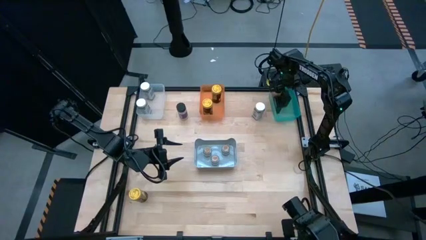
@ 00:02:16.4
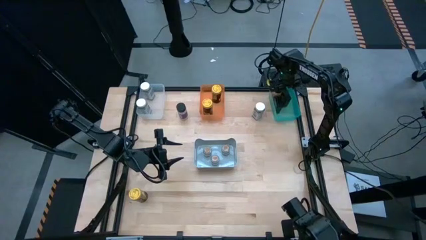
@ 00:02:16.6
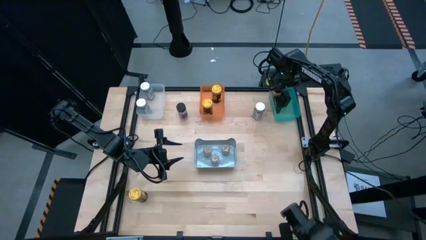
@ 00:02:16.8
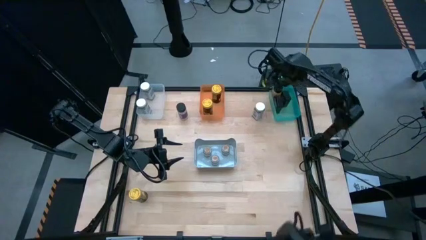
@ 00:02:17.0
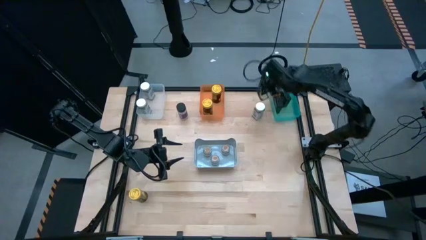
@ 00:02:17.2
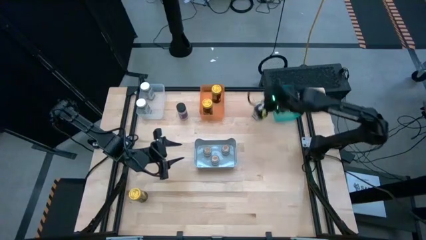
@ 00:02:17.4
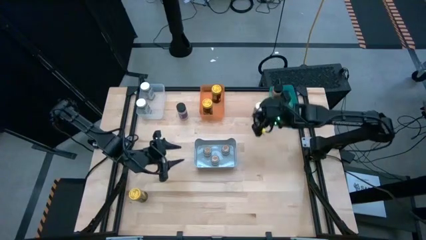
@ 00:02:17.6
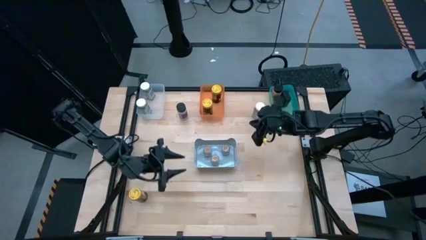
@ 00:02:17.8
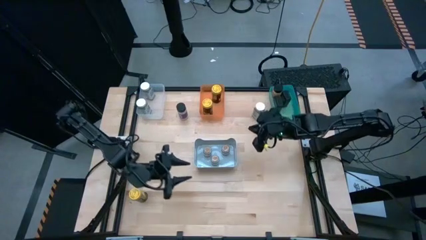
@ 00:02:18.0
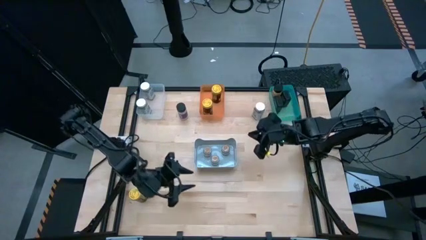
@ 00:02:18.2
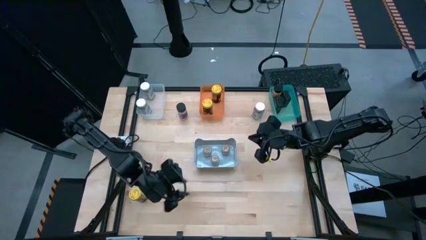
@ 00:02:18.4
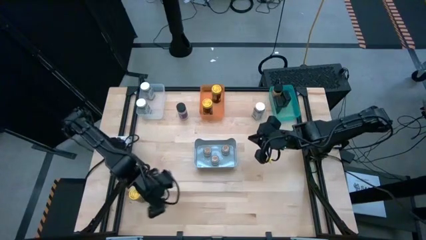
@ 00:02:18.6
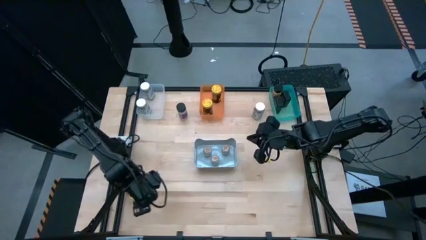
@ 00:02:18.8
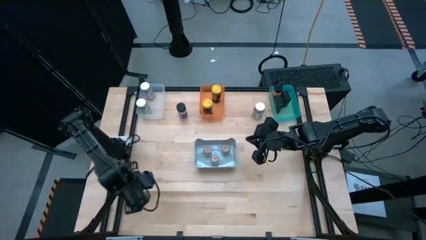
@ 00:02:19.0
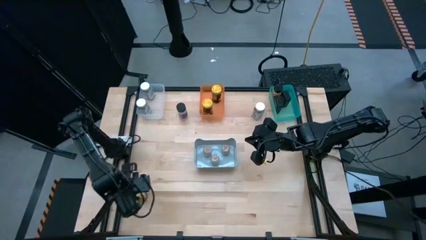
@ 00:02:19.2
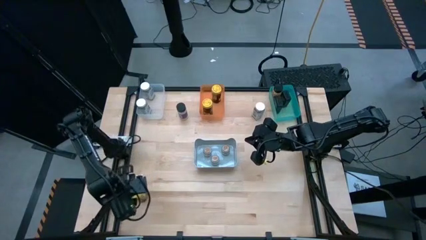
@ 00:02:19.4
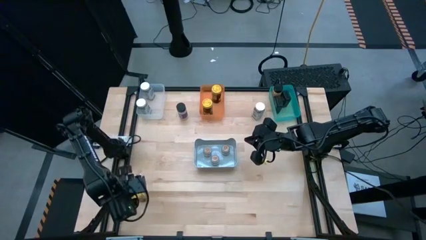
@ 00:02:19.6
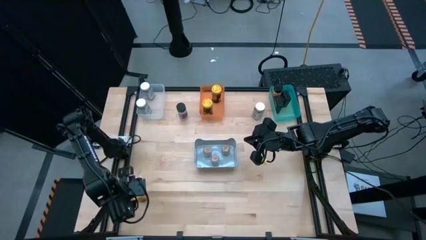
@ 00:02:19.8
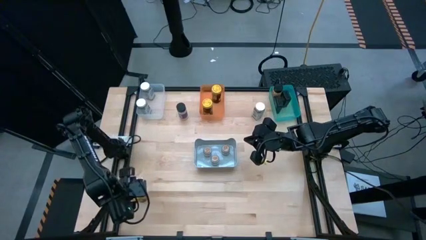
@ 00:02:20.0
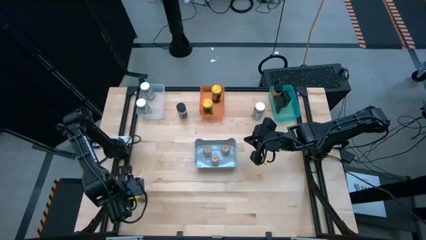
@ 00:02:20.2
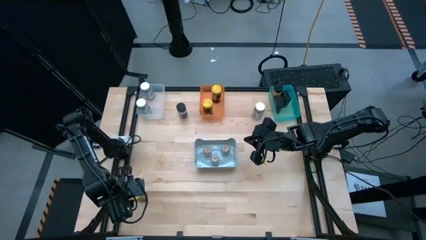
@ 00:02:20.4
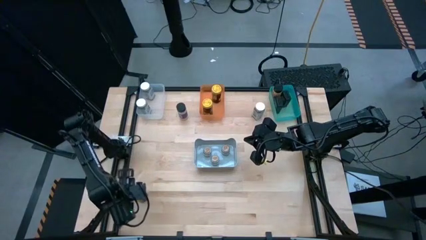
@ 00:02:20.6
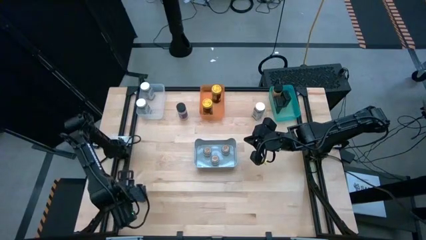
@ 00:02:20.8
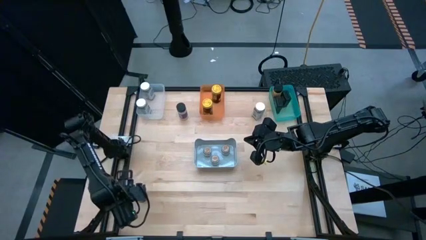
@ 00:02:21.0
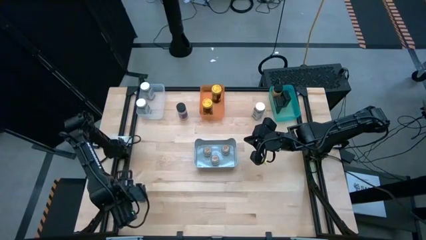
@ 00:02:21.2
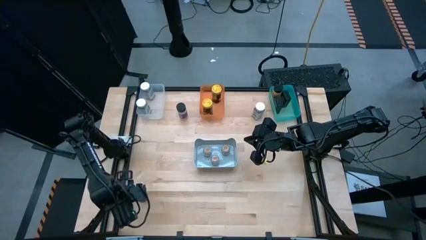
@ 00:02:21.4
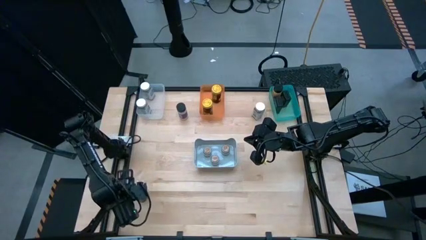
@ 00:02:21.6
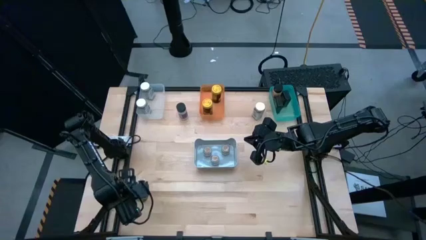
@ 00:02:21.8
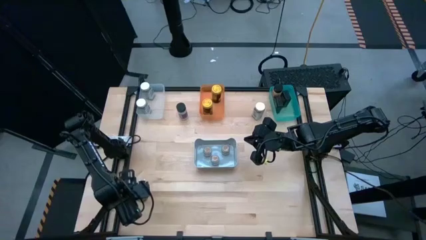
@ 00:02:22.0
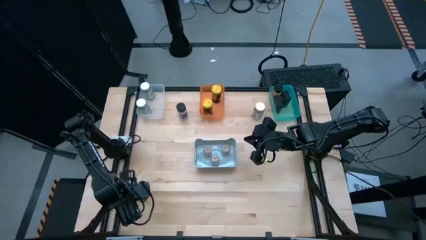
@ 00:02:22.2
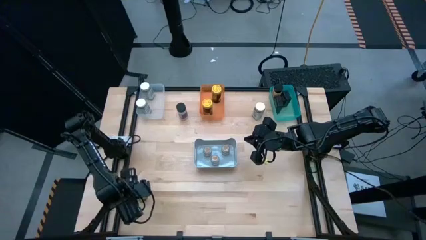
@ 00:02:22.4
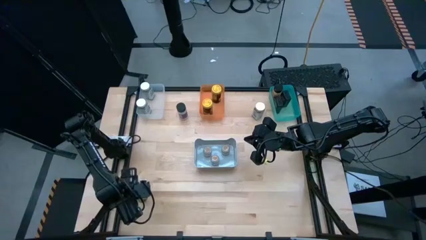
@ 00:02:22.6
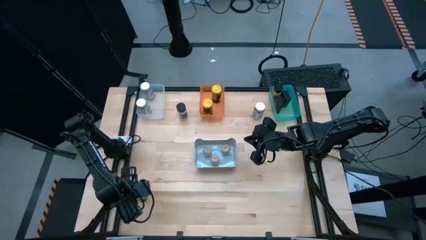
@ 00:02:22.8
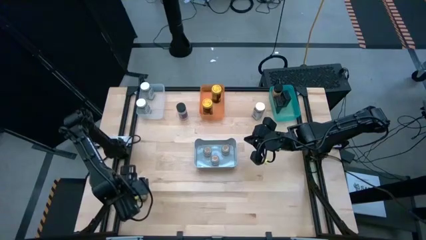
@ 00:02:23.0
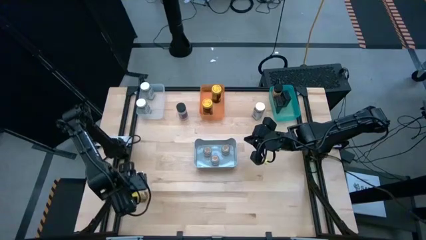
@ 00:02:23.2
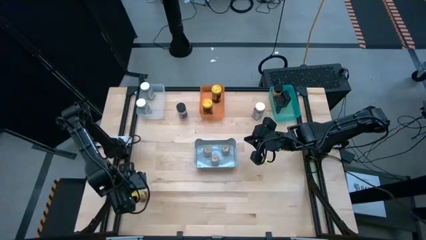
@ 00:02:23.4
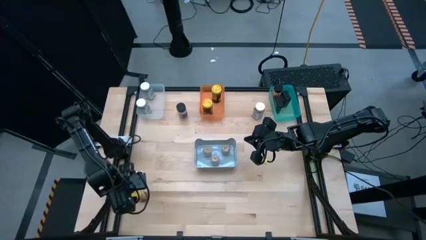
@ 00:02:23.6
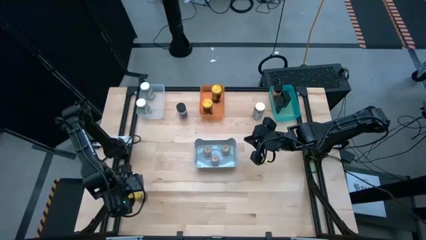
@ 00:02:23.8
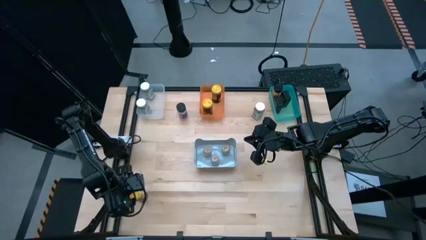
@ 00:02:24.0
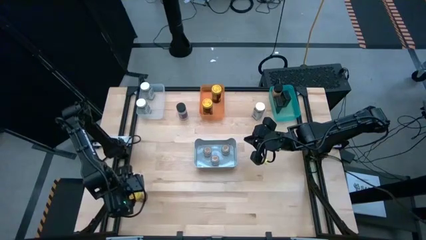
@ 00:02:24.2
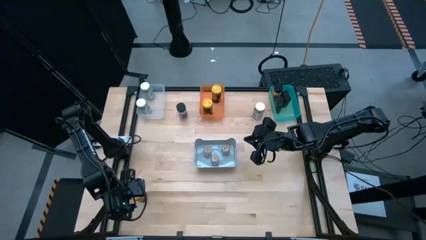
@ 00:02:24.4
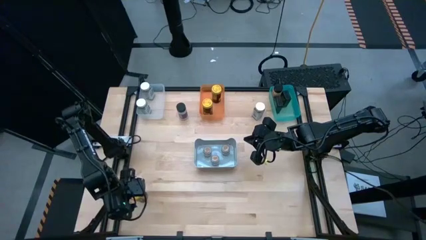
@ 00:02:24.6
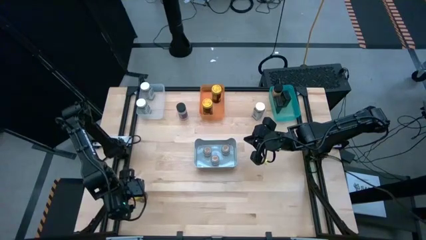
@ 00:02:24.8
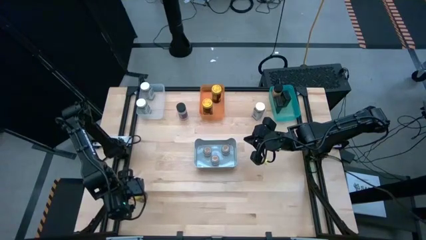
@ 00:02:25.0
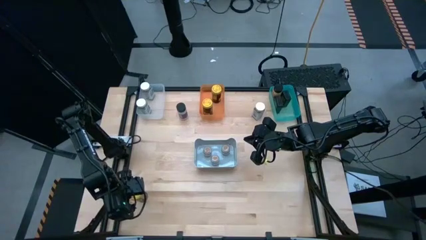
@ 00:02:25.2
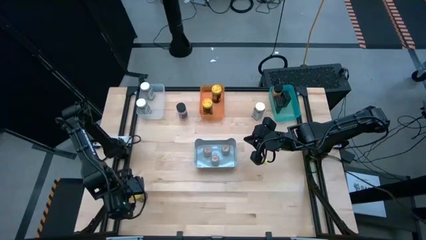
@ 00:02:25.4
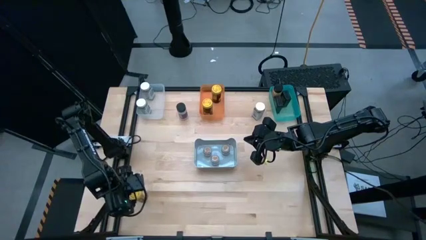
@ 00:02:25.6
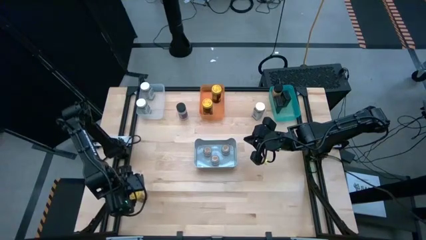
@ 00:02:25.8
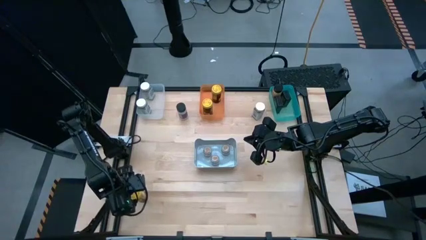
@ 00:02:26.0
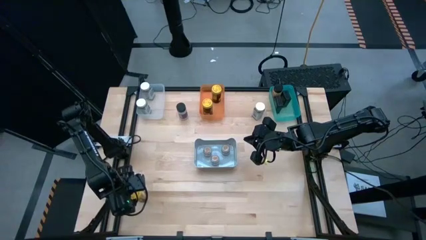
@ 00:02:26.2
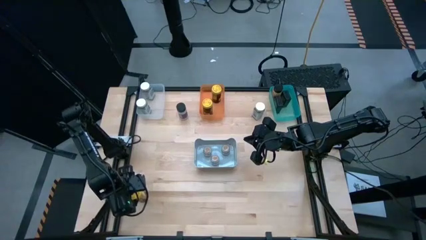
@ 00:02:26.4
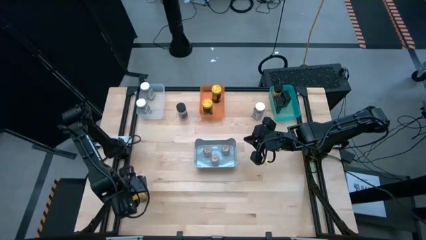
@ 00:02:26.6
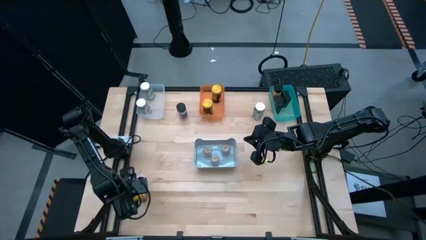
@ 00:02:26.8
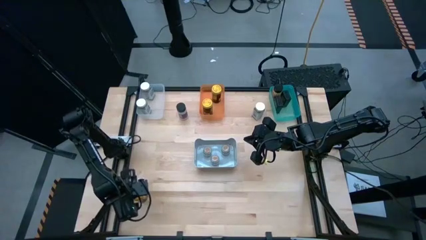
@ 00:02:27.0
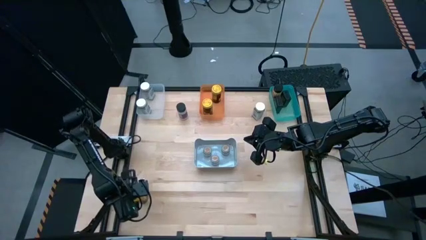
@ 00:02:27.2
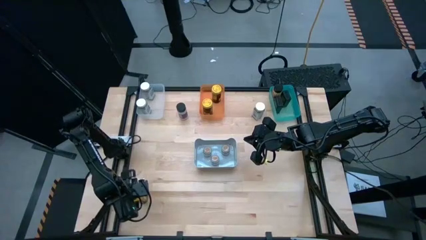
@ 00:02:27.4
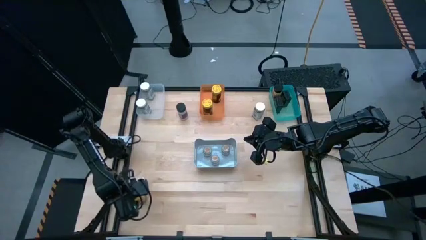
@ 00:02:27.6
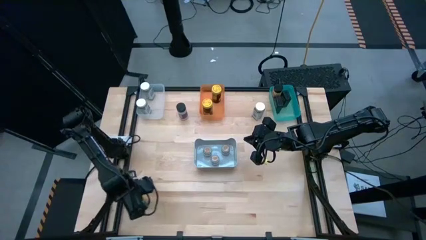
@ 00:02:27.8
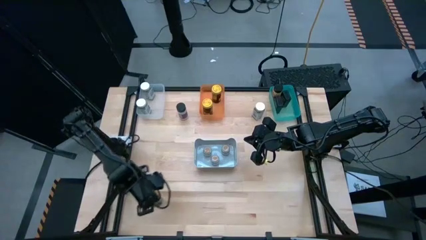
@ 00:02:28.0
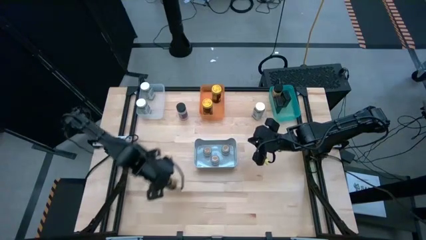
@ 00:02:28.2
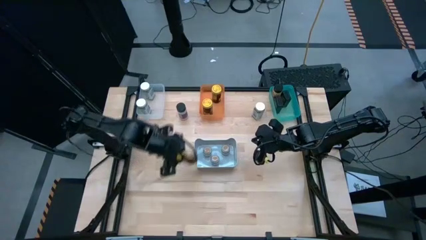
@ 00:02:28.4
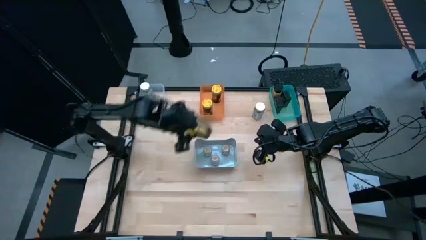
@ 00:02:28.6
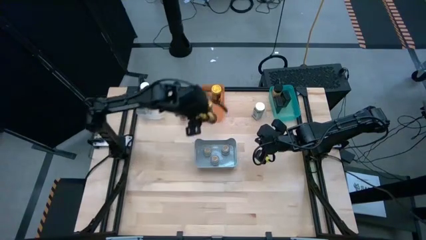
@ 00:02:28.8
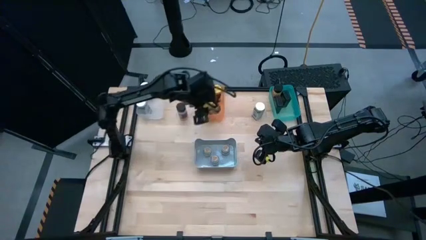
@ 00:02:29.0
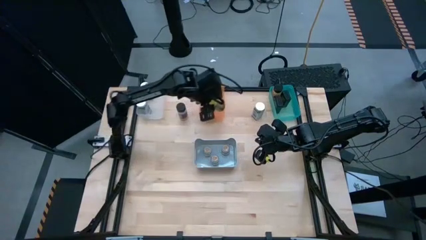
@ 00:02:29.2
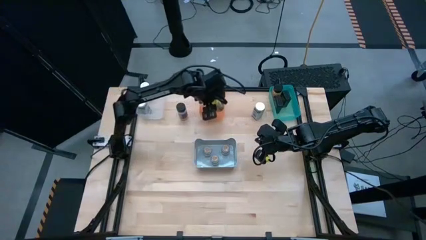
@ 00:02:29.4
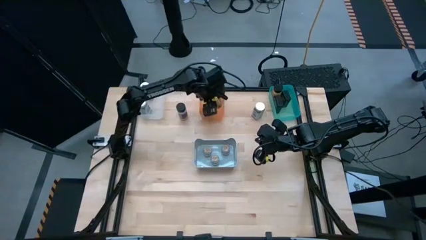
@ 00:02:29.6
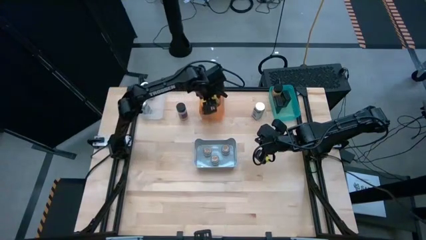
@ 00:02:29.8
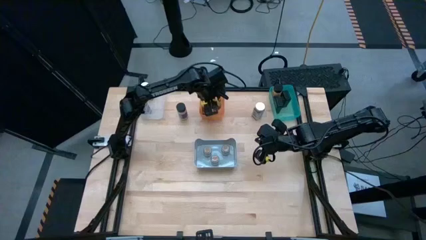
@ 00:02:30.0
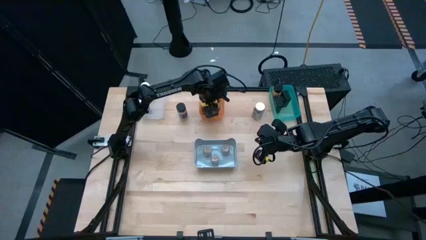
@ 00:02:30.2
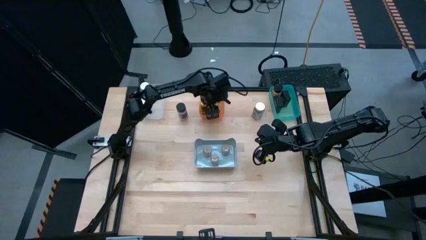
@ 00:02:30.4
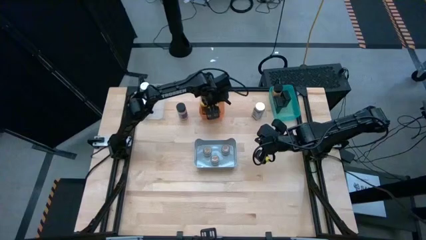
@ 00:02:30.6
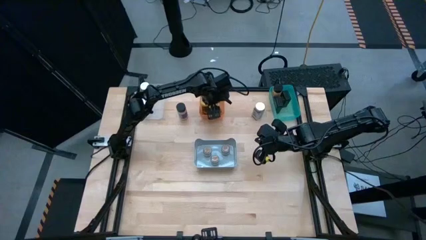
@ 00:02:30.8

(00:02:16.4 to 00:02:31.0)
Task: Sort spices by type
Put the yellow seasoning bottle into the orange bin
